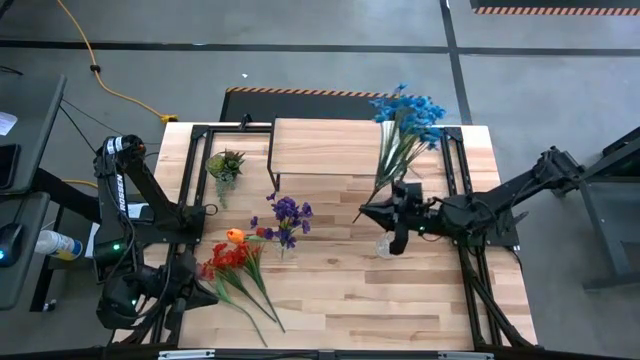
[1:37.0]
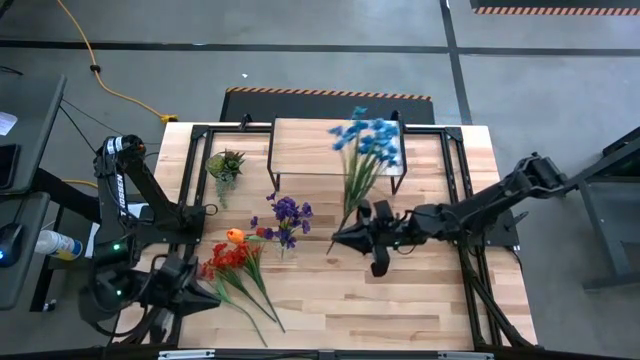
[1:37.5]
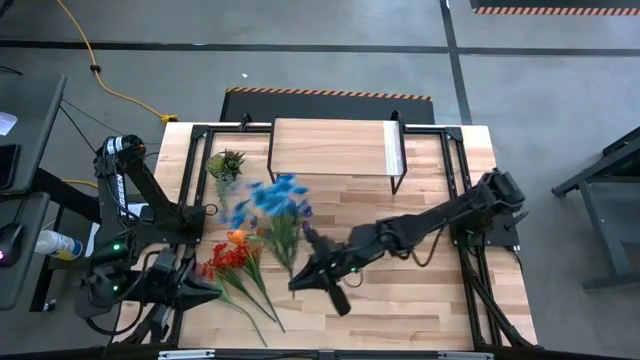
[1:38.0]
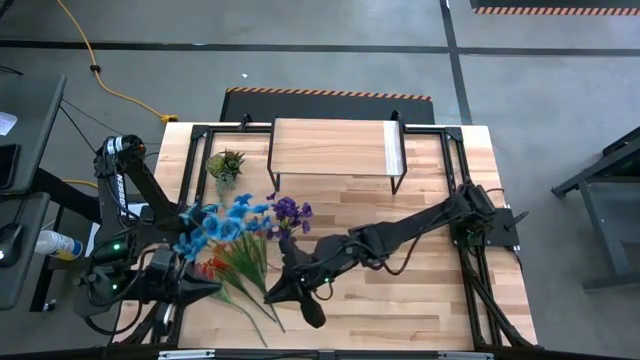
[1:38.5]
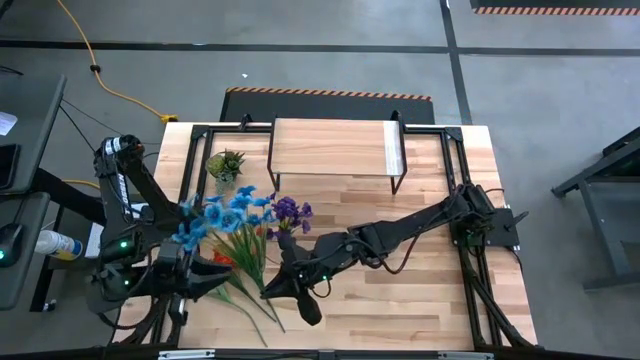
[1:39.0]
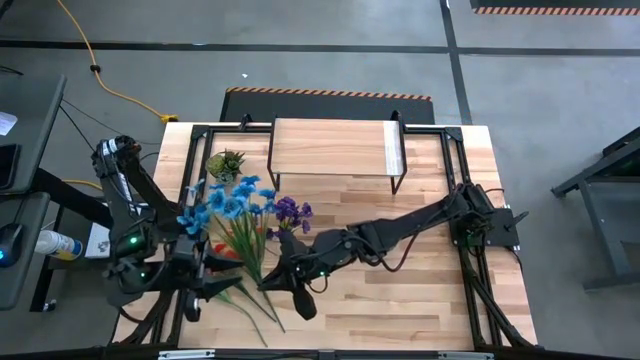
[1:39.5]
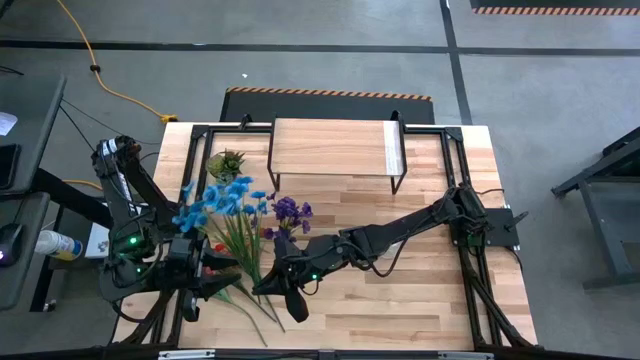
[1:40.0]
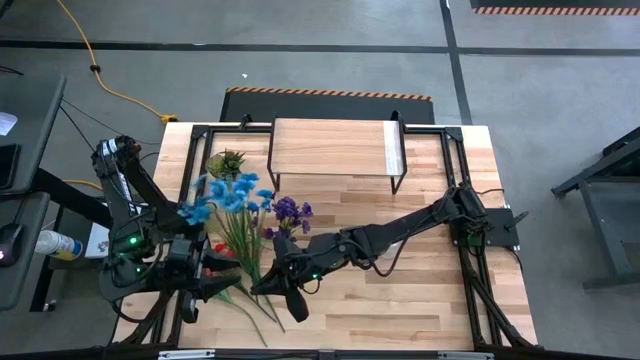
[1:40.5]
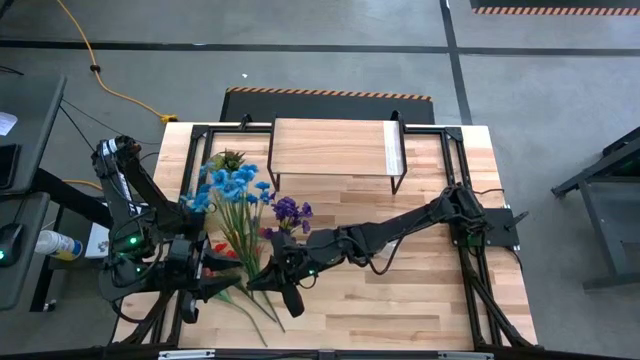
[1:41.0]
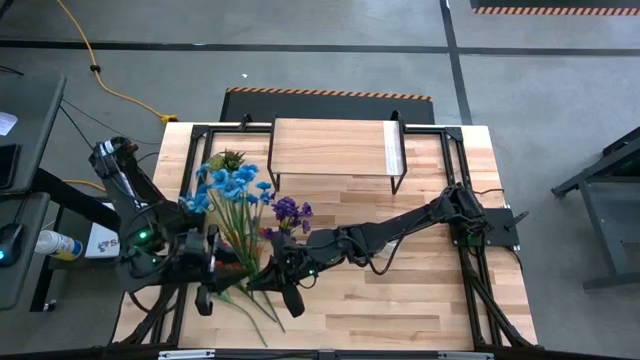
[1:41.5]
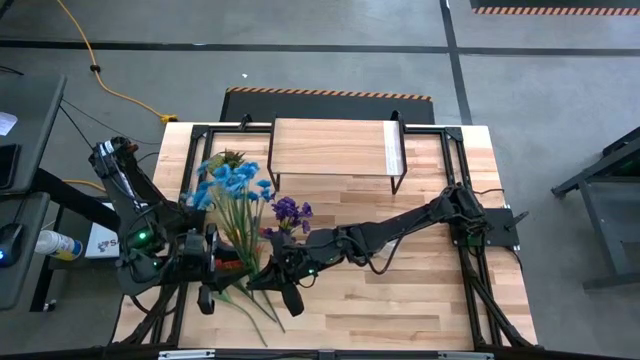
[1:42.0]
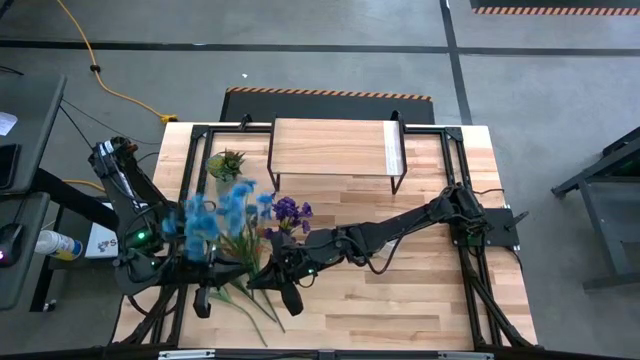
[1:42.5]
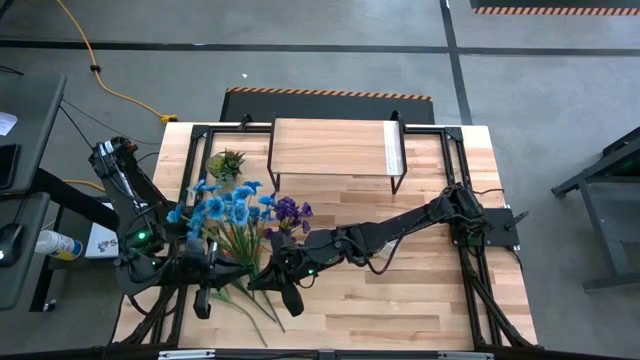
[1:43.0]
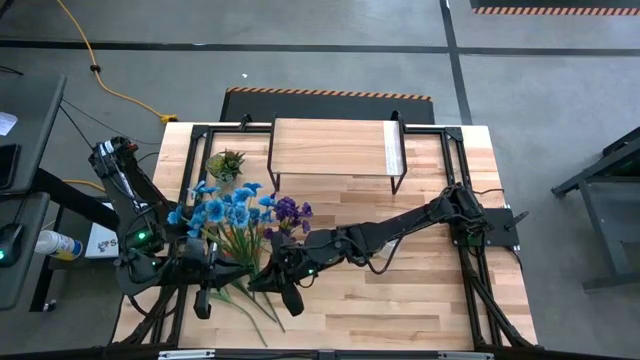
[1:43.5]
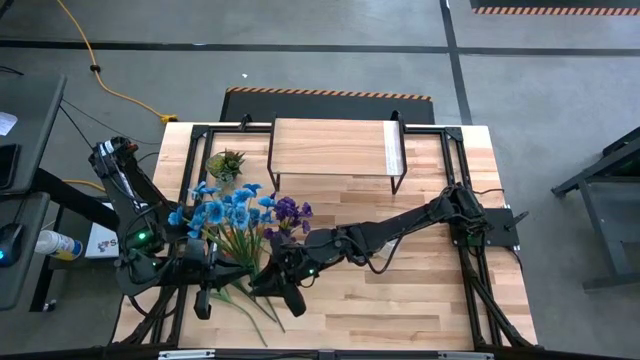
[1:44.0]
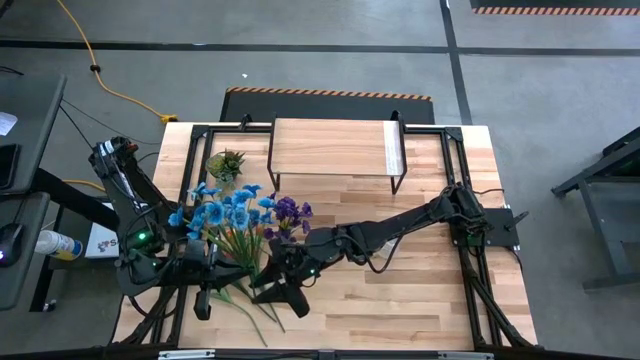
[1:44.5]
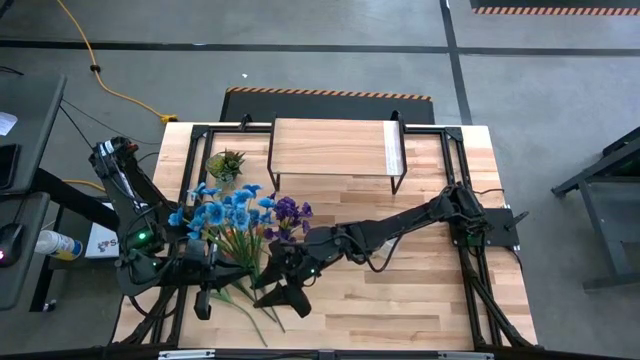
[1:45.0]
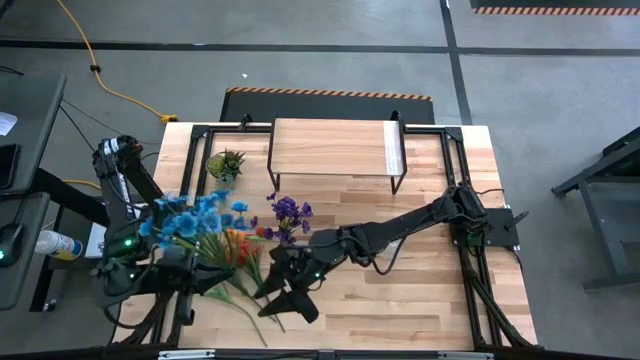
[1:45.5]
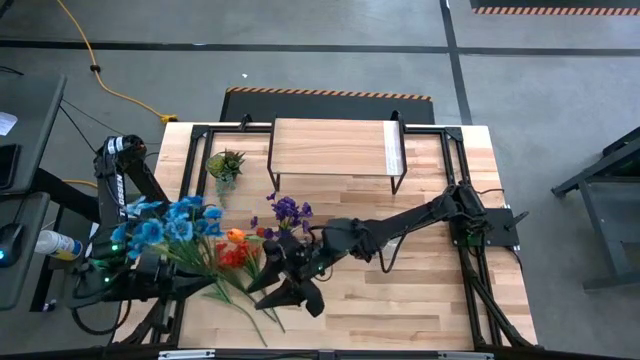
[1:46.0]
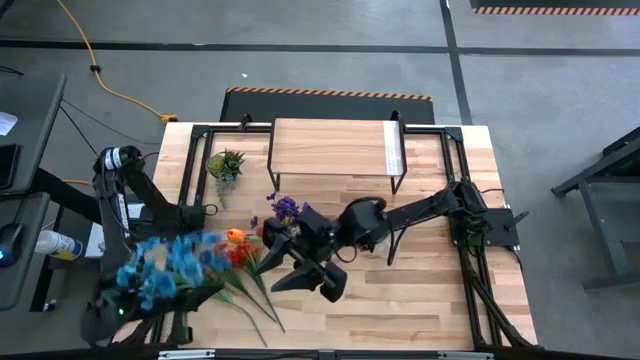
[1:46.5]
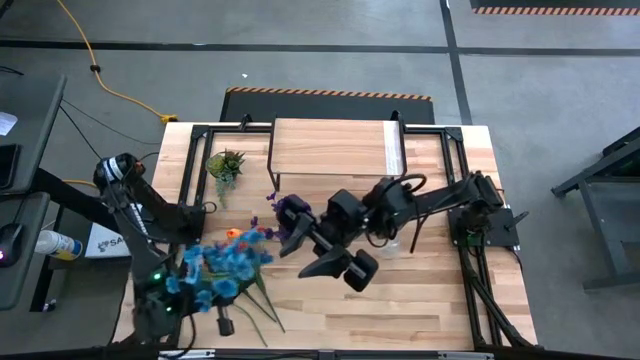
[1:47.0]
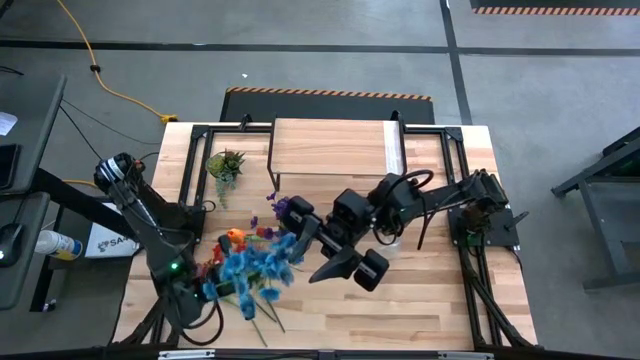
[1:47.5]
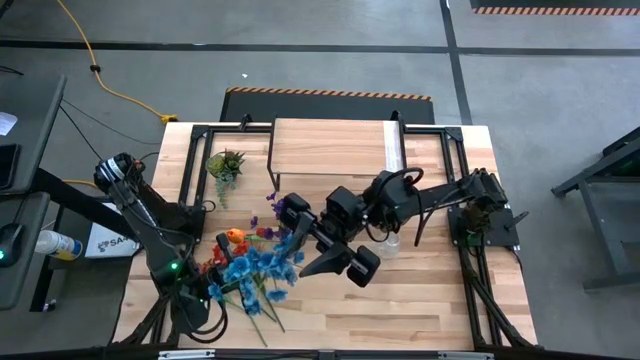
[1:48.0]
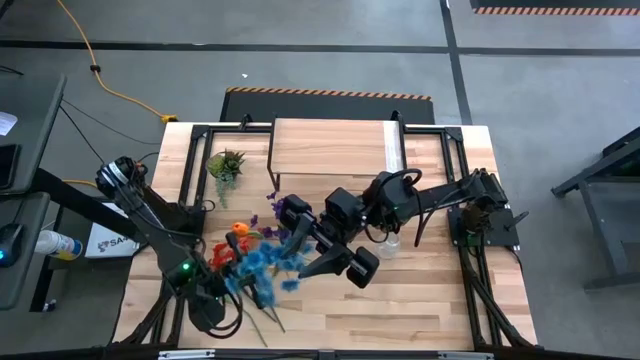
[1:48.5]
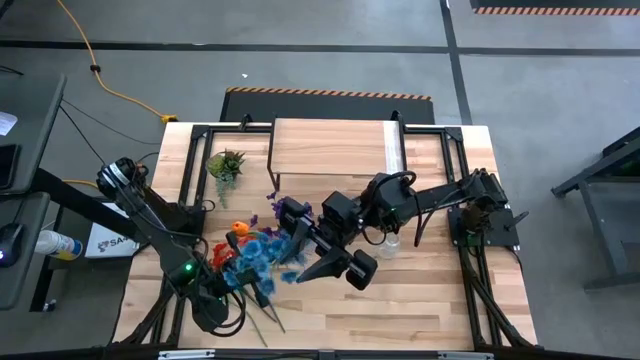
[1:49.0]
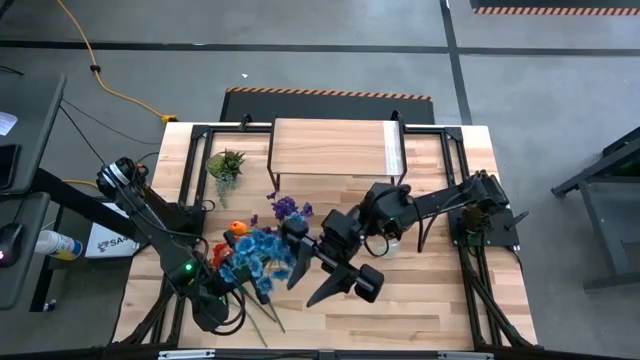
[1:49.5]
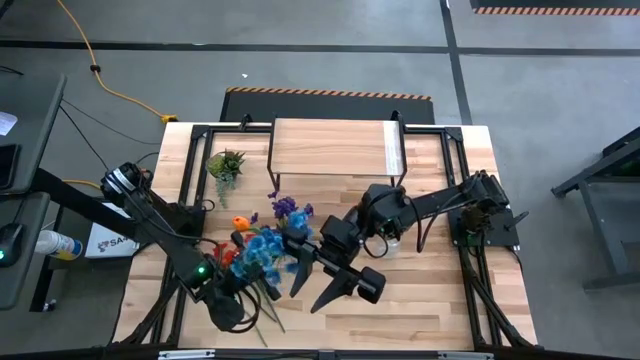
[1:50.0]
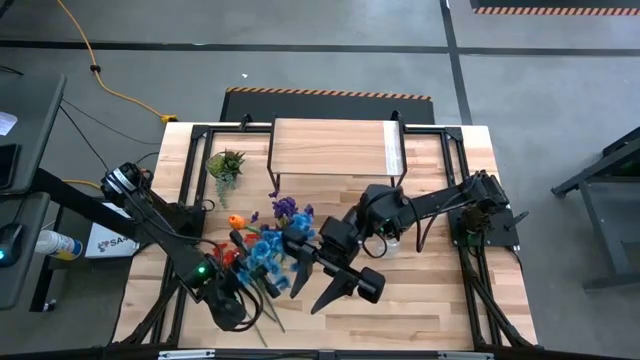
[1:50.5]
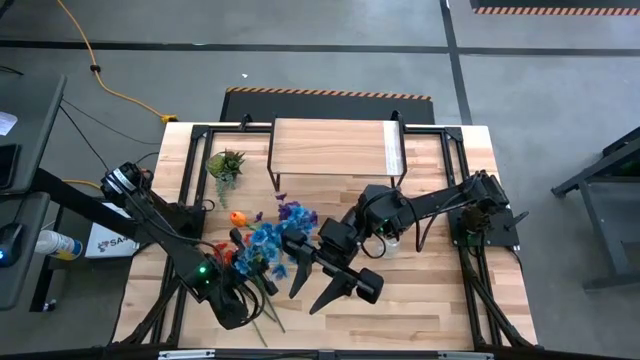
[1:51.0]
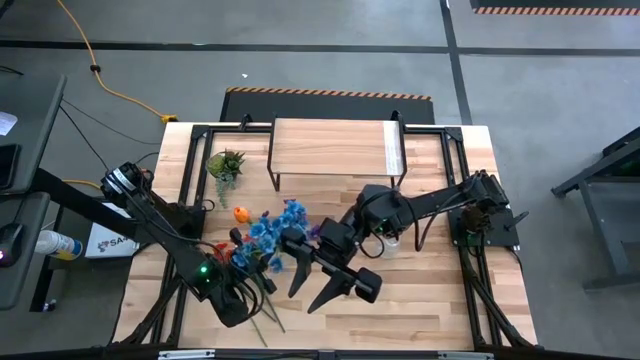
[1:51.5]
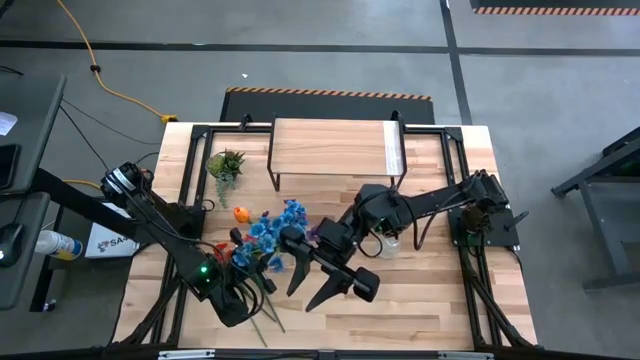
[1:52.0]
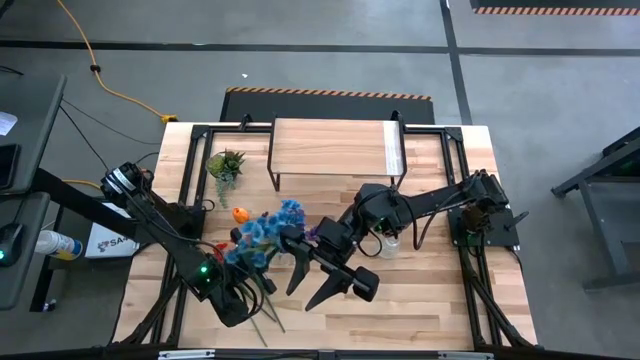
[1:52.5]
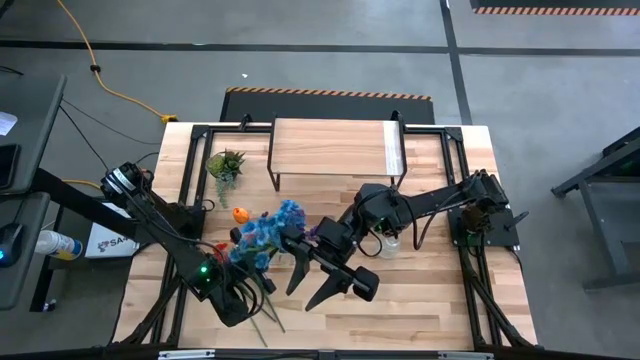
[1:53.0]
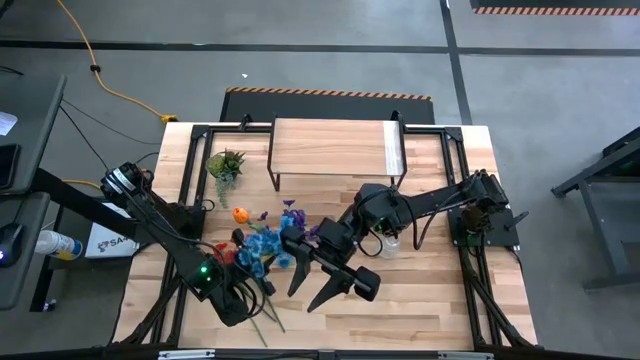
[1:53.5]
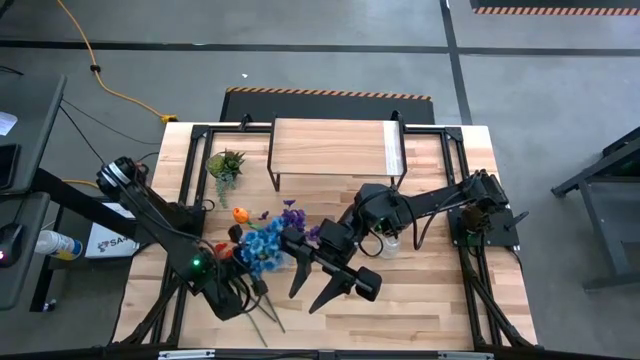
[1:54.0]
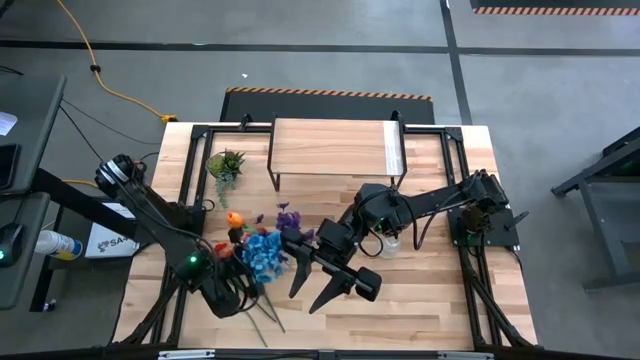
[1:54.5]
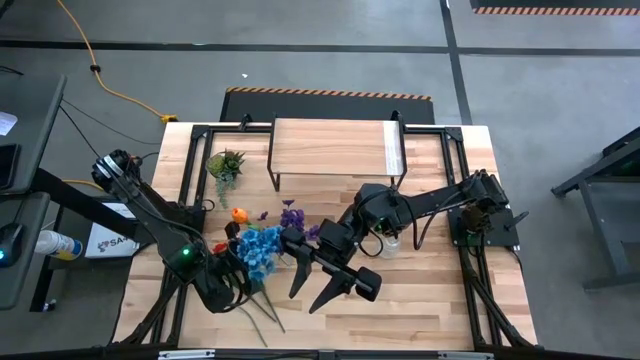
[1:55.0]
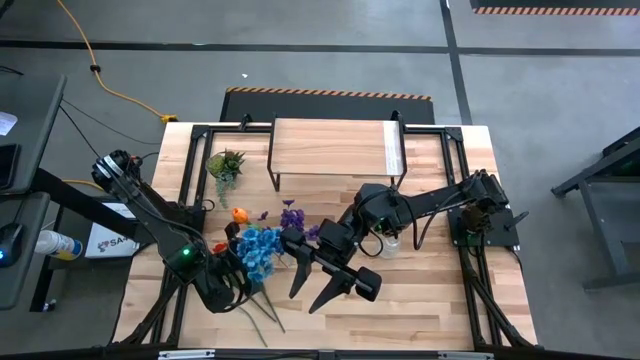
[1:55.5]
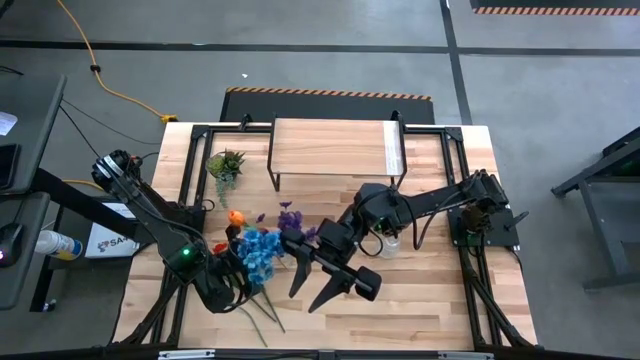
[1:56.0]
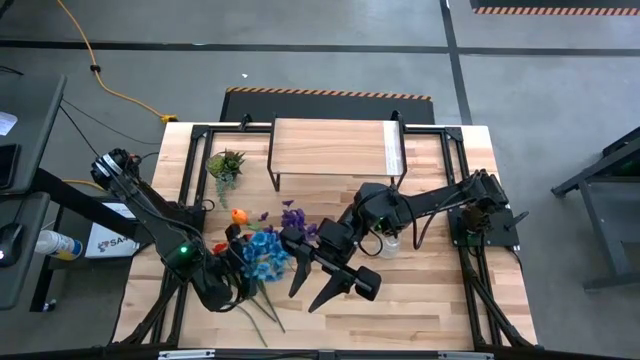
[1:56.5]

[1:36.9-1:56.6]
Task: Pick and place flowers into a vace then onto a shelf
Put the blue flower into the left transparent flower vase

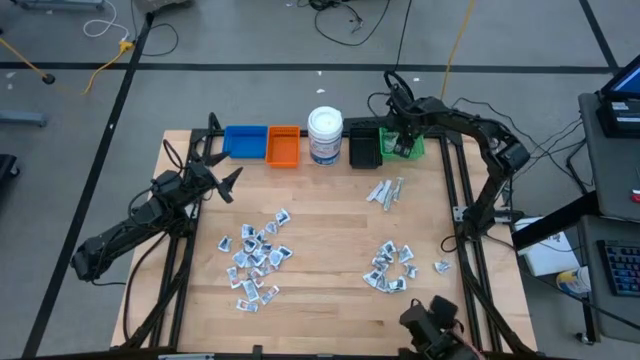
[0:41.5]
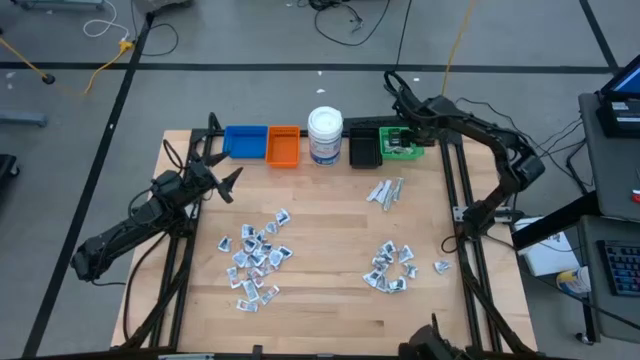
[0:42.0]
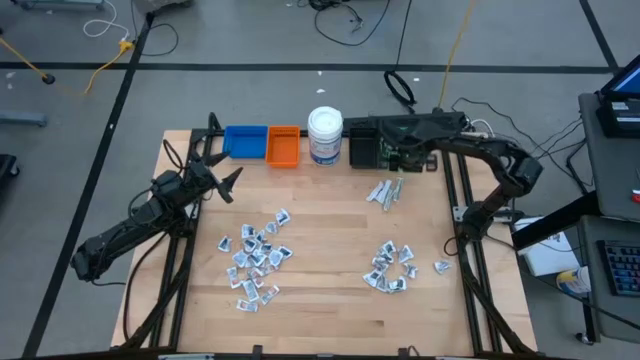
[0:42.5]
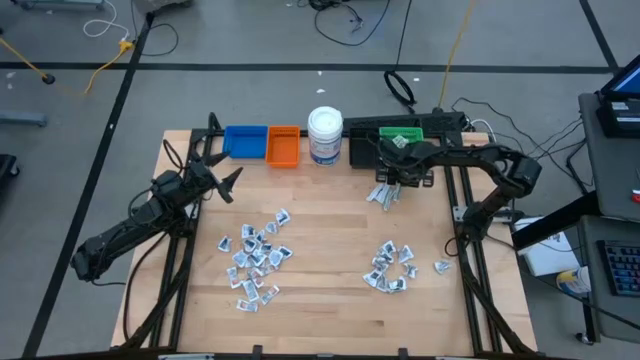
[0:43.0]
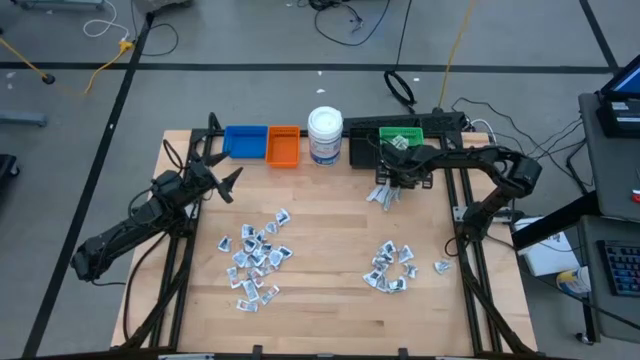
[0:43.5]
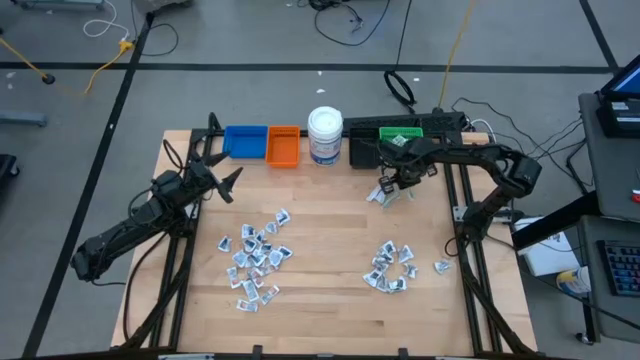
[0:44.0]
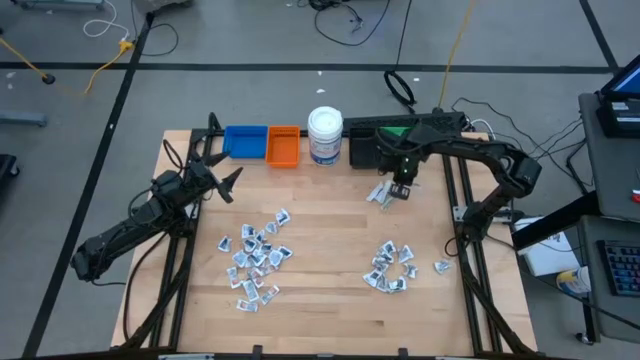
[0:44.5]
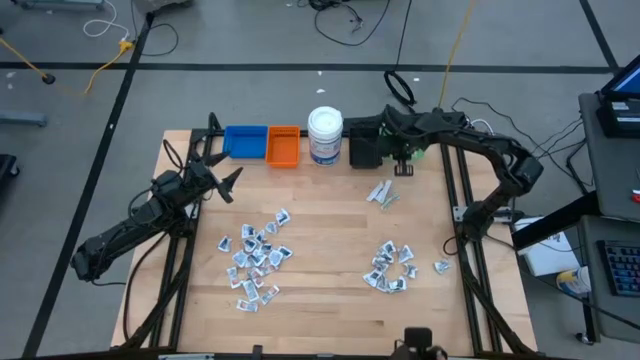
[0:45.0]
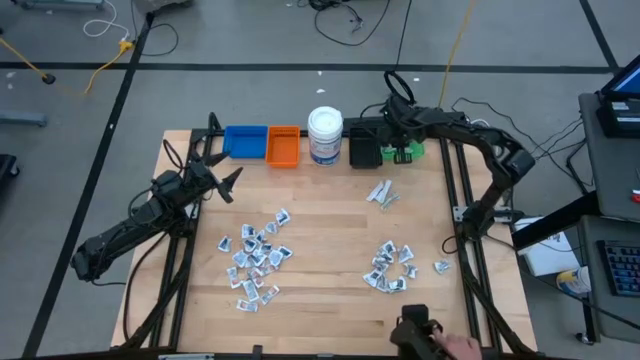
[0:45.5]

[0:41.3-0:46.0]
Task: Pick & Place First Aid Supplies
Put the bandage into the green bin
